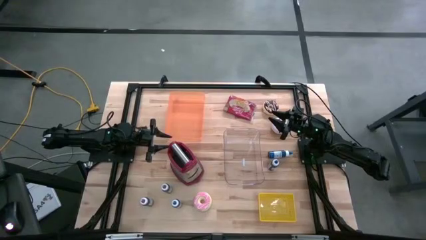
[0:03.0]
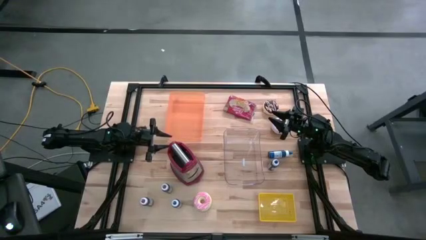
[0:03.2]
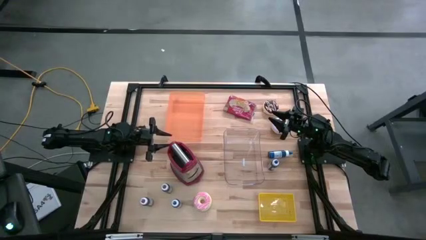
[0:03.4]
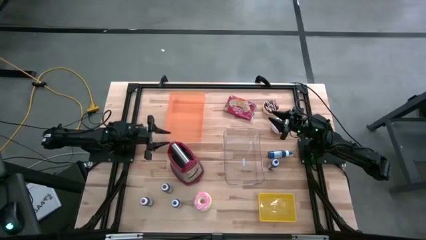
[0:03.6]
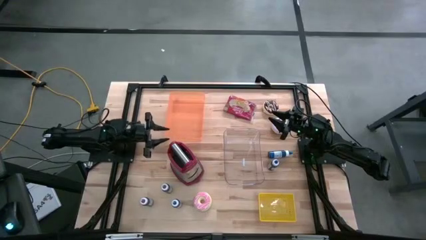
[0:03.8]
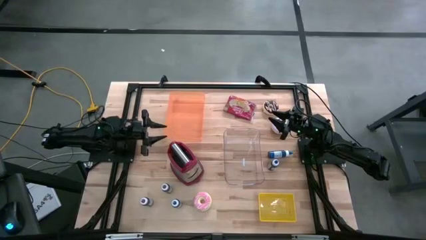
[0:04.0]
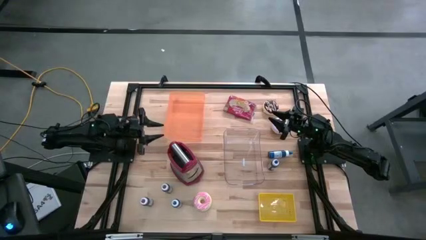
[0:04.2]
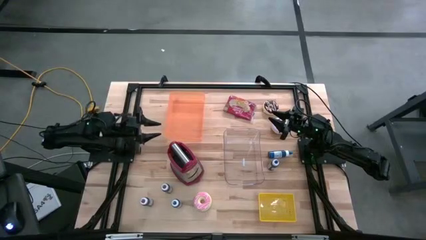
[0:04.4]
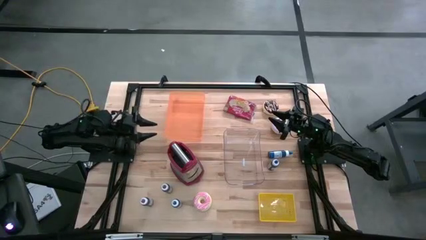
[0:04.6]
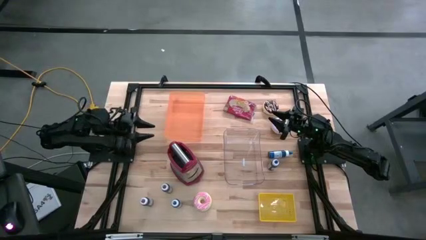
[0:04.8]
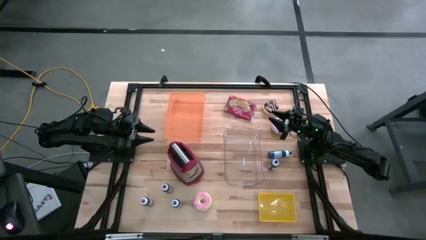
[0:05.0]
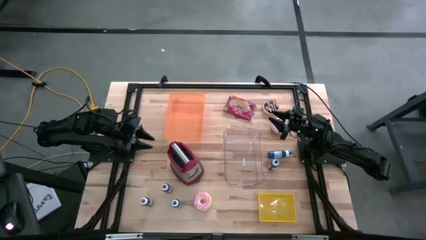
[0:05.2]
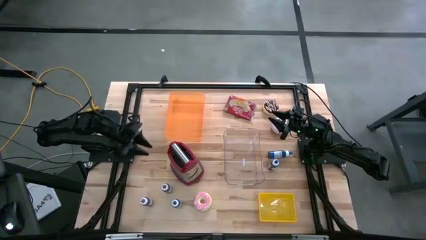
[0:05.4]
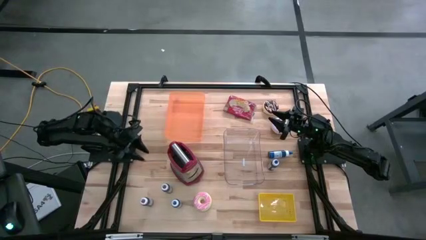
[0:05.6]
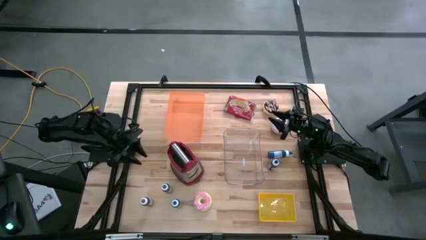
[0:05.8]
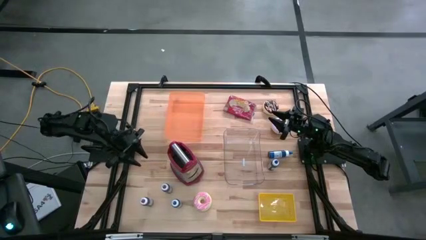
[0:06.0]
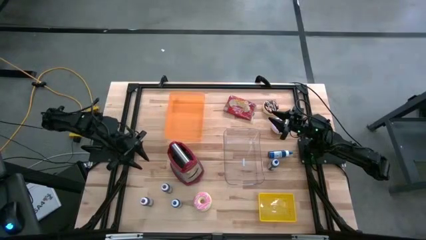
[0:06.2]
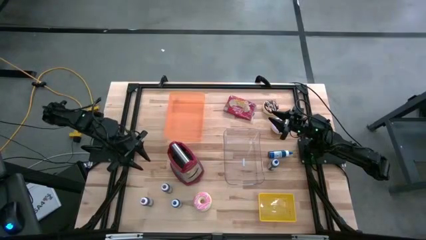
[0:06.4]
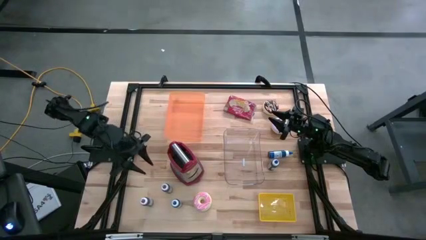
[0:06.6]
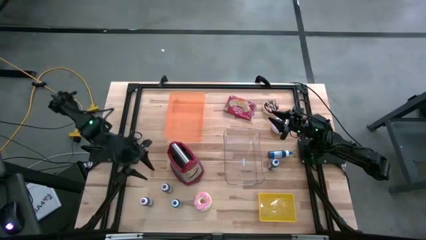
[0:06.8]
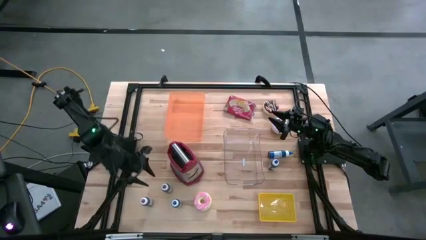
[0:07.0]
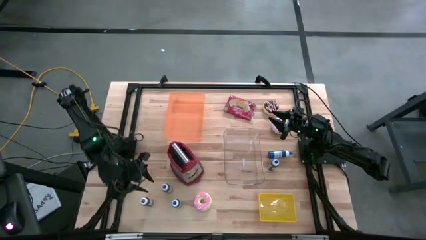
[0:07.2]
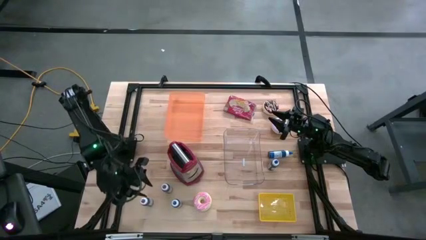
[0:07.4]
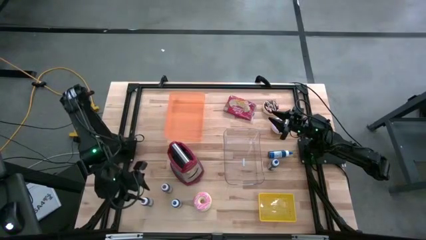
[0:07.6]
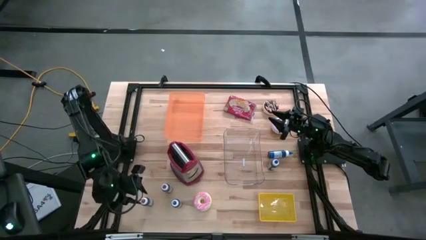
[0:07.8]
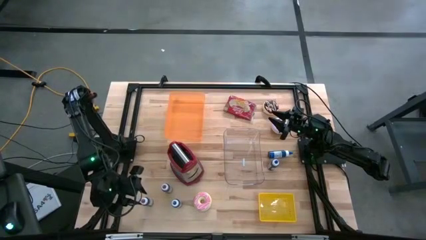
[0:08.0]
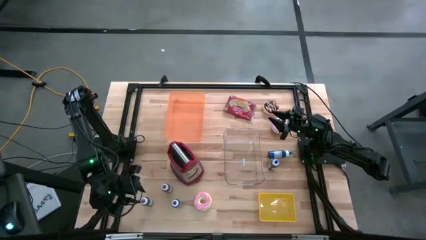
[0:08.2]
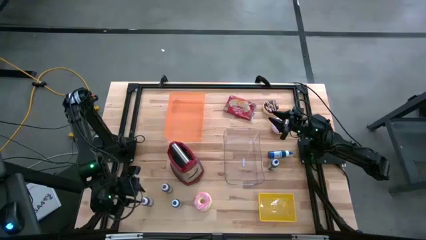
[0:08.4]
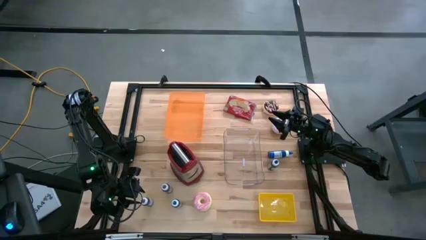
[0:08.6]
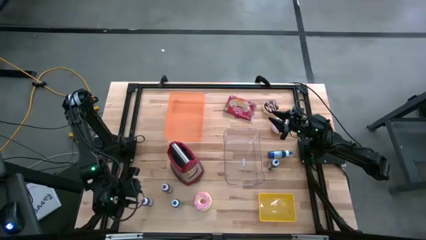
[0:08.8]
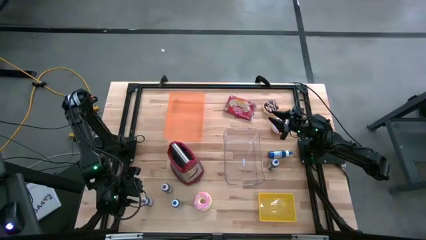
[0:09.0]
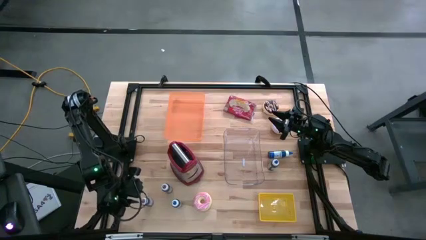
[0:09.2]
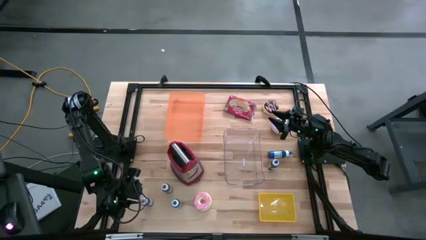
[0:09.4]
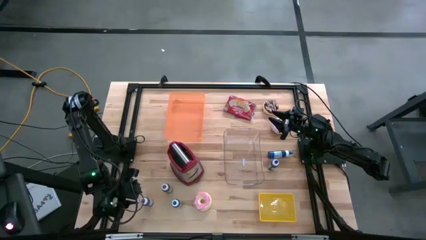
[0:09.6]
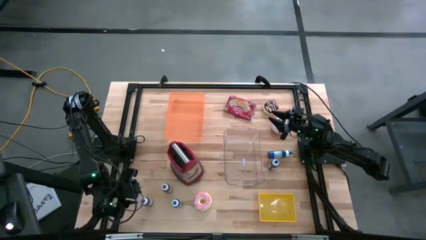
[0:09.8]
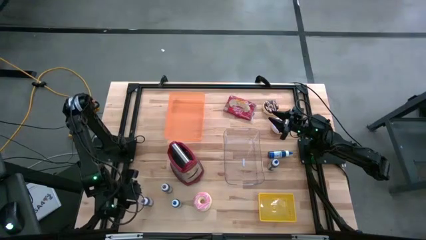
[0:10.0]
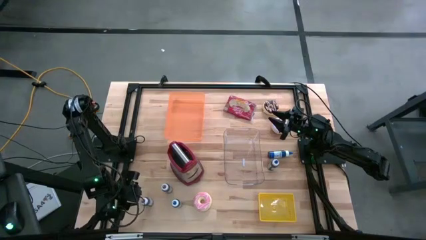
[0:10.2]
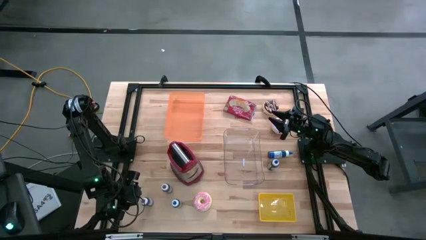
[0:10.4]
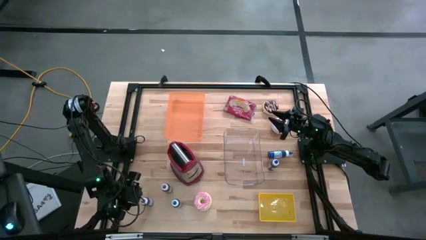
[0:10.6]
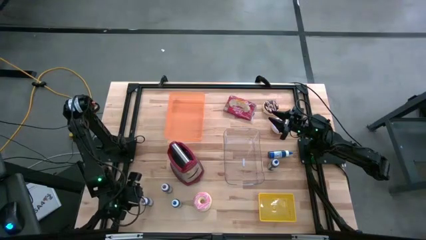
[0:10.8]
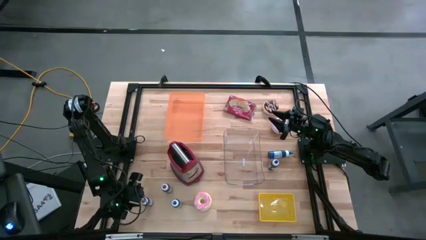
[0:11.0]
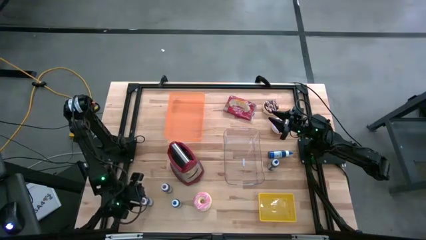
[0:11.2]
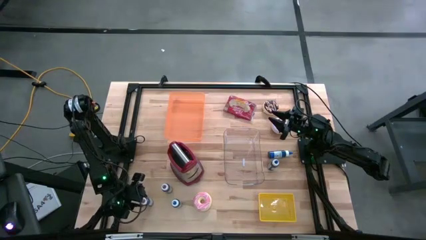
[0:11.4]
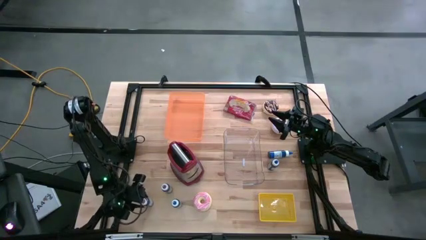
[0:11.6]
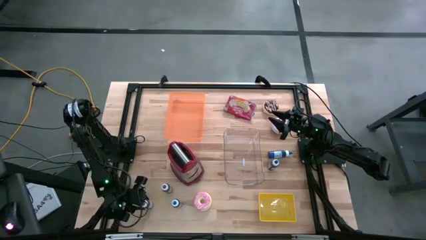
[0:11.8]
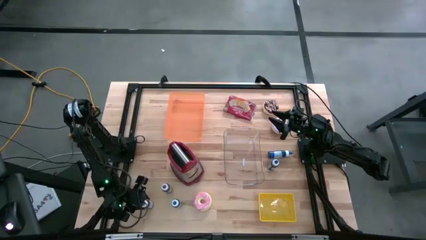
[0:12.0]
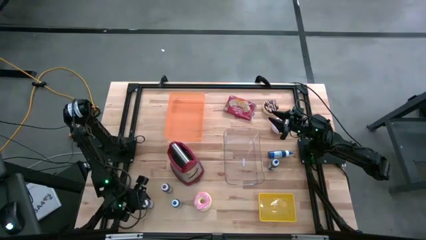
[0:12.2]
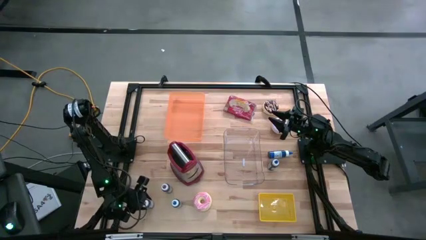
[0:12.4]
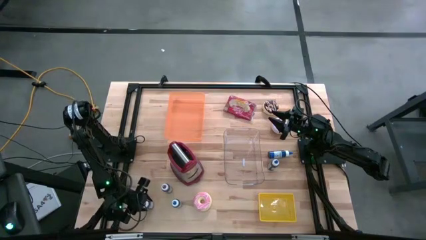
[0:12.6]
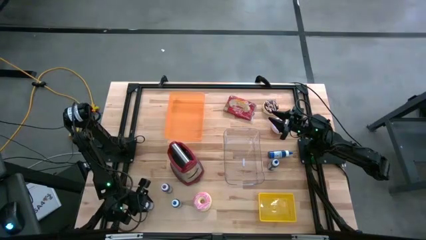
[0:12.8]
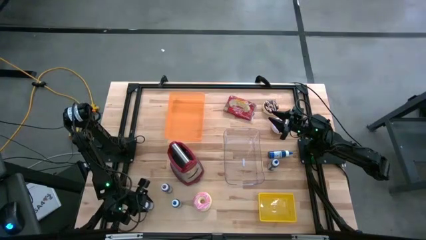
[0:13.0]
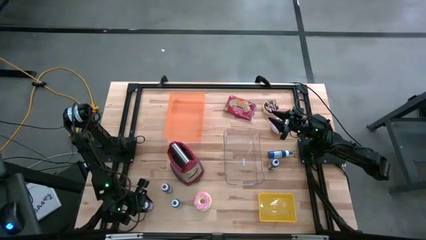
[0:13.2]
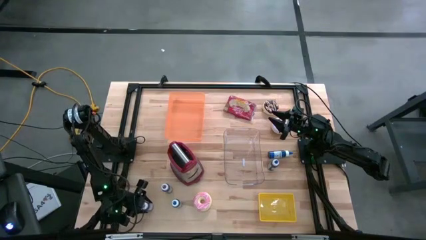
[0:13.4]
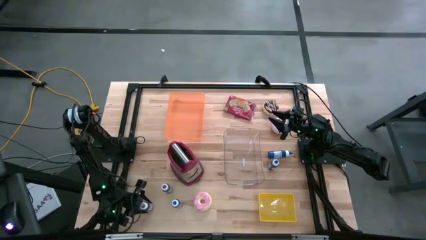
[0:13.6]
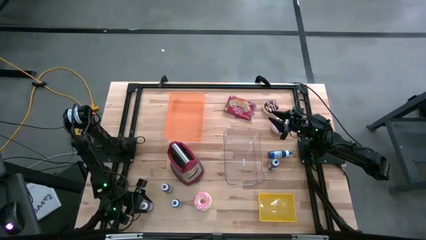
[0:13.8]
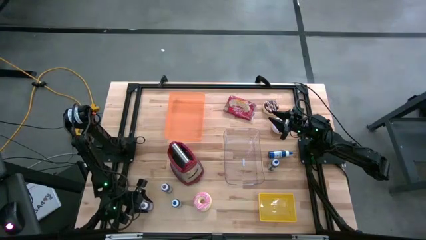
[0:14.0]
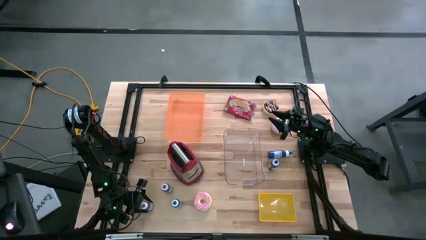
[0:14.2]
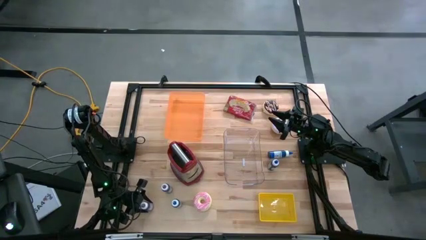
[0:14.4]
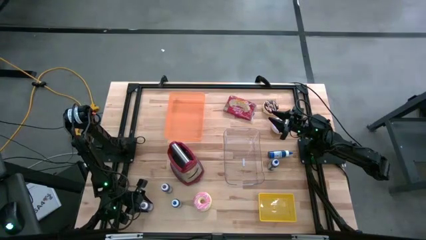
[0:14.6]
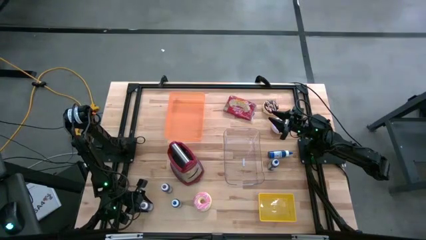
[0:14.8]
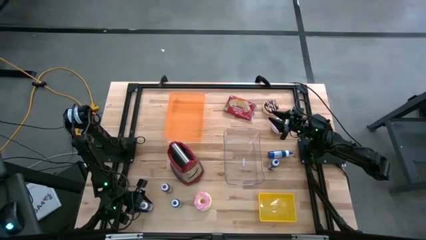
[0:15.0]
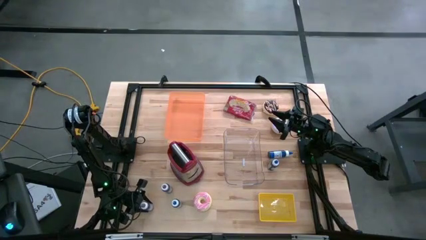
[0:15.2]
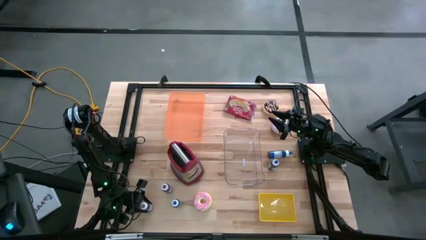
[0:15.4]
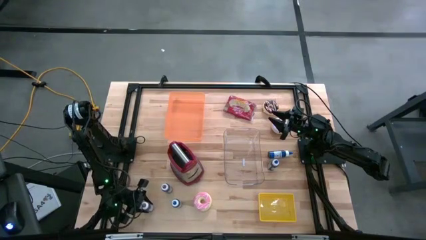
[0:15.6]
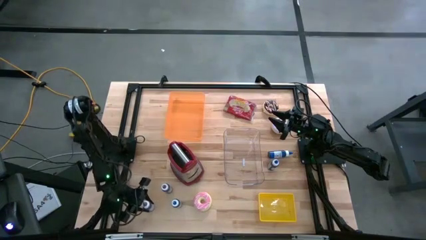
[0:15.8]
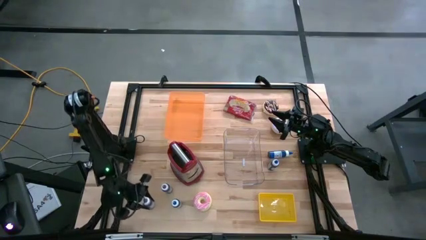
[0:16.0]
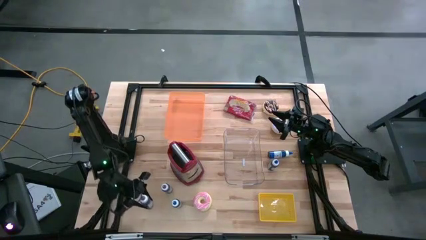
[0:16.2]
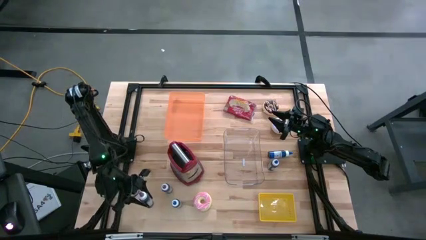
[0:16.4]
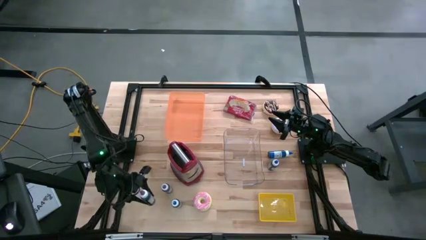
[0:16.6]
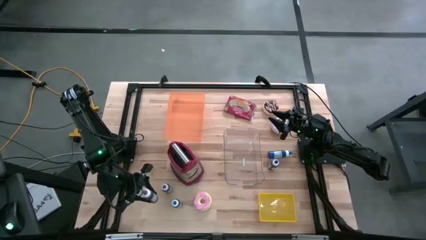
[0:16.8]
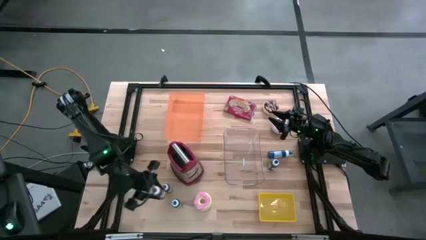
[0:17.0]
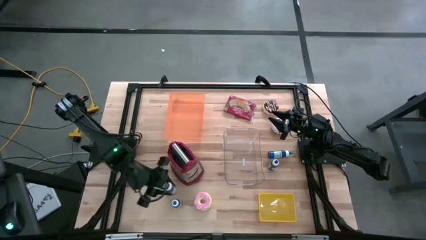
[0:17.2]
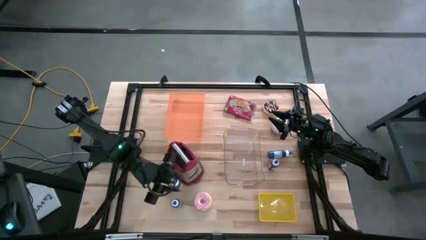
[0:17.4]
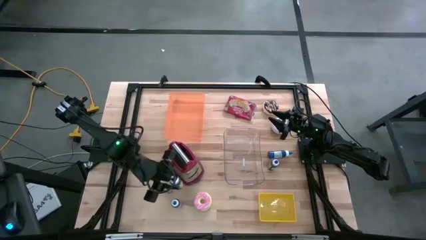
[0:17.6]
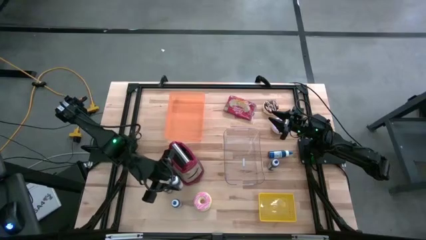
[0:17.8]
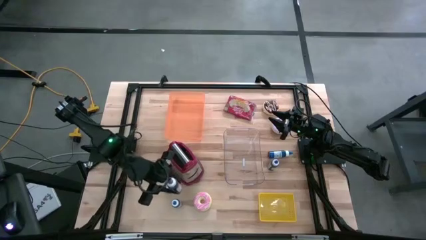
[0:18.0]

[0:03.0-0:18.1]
Task: Pick & Place Food Item
Put the bottom purple food coloring bottle into the transparent bin
